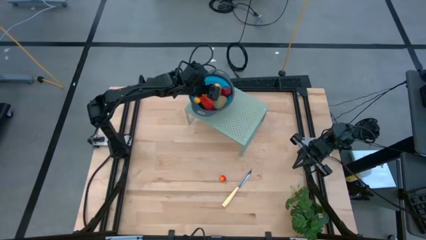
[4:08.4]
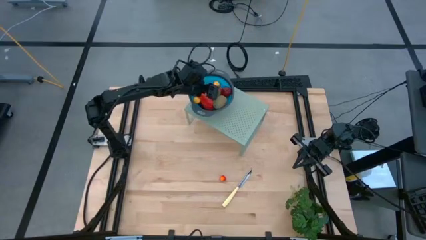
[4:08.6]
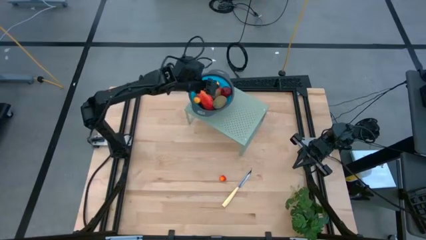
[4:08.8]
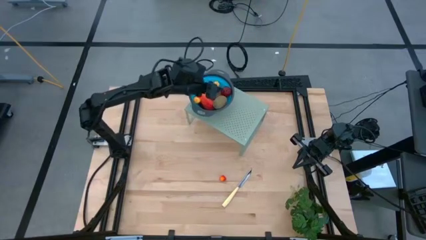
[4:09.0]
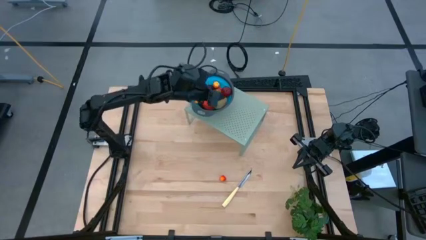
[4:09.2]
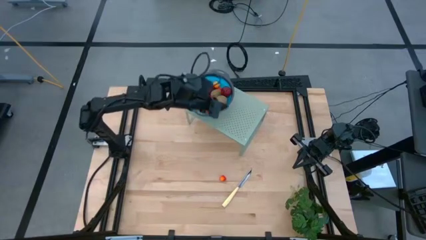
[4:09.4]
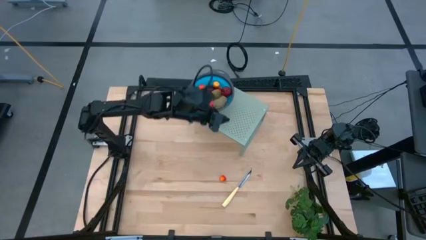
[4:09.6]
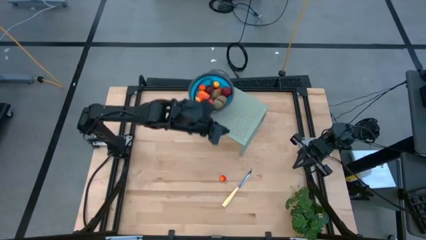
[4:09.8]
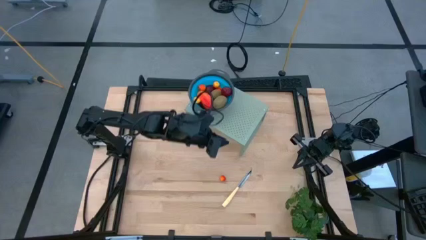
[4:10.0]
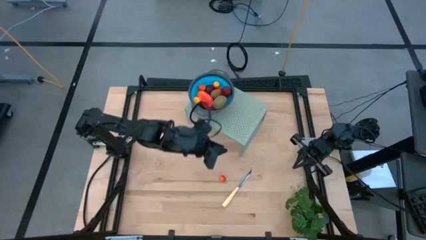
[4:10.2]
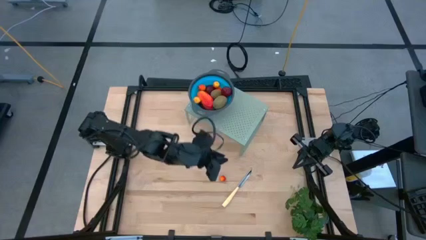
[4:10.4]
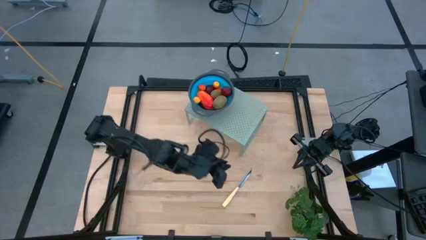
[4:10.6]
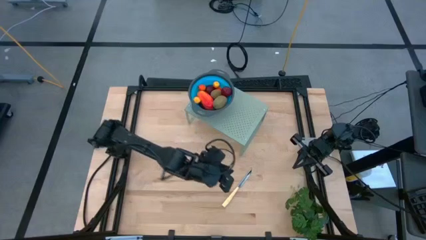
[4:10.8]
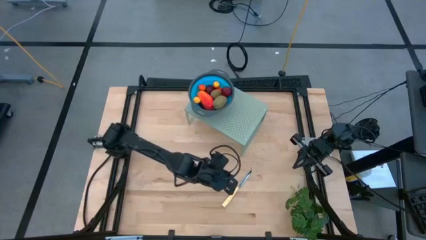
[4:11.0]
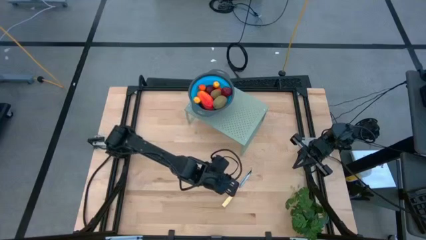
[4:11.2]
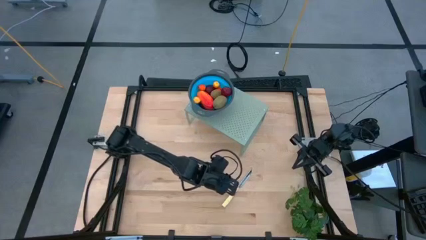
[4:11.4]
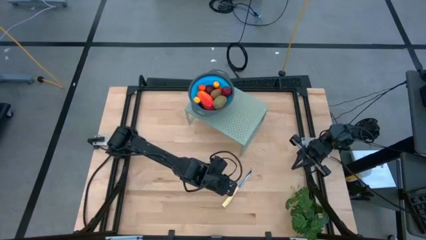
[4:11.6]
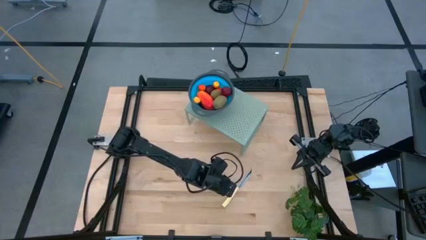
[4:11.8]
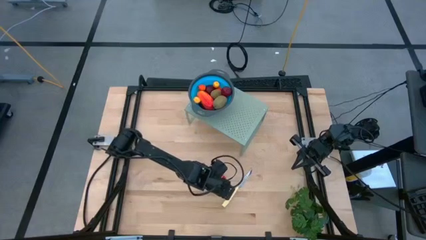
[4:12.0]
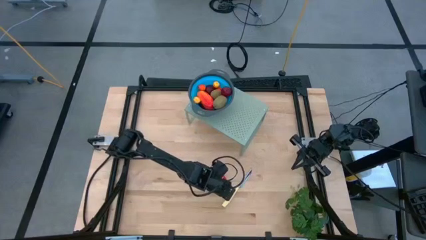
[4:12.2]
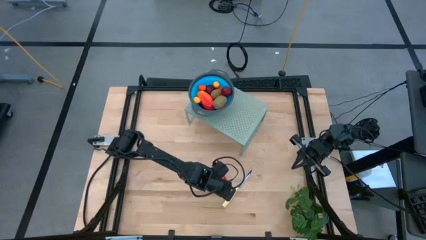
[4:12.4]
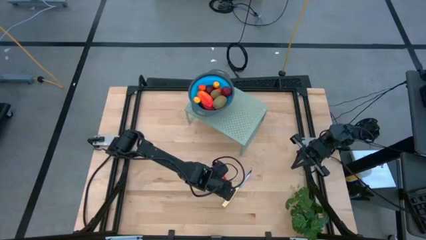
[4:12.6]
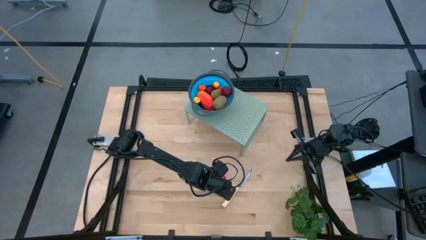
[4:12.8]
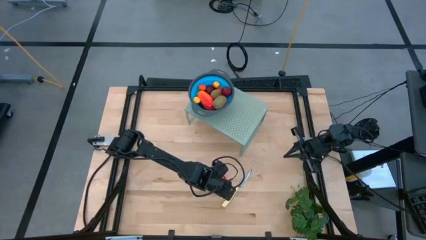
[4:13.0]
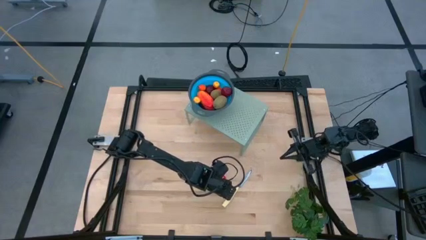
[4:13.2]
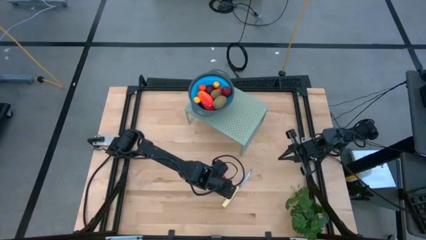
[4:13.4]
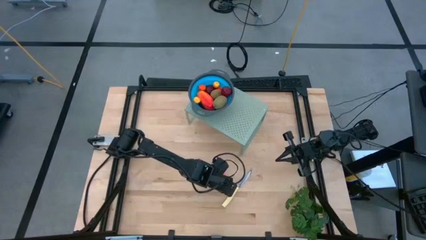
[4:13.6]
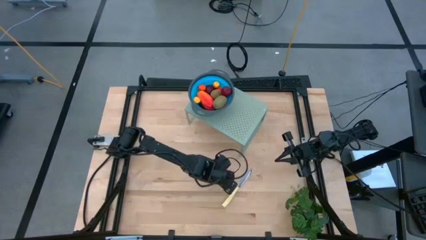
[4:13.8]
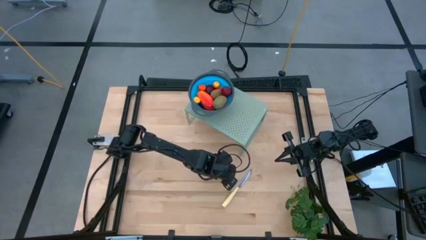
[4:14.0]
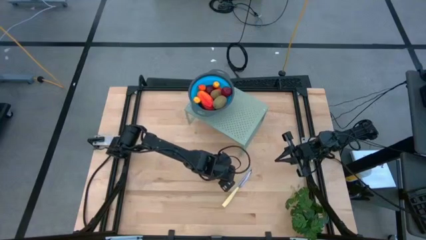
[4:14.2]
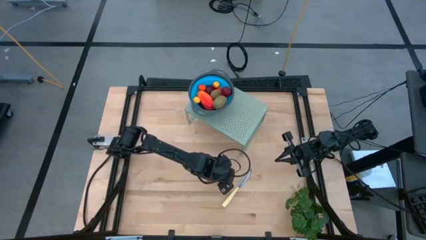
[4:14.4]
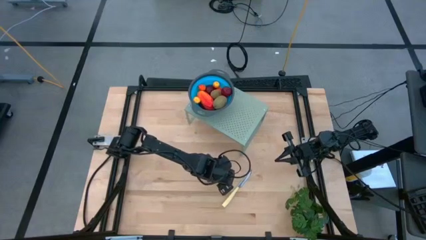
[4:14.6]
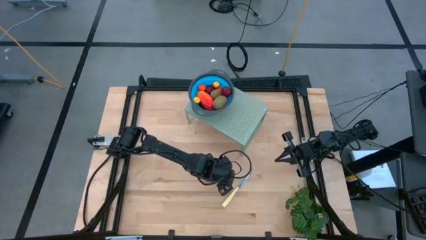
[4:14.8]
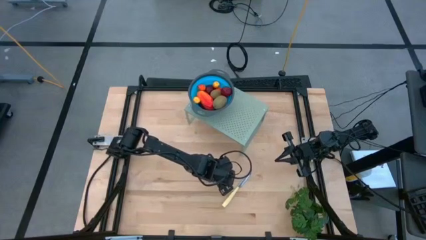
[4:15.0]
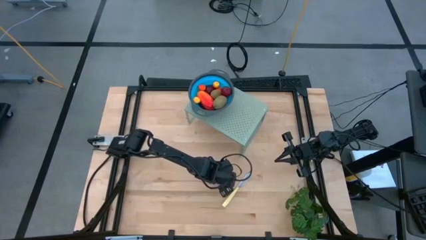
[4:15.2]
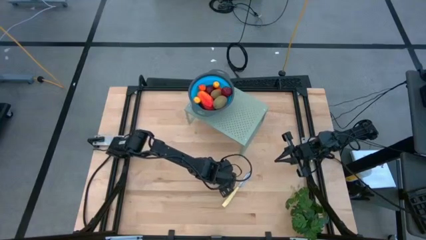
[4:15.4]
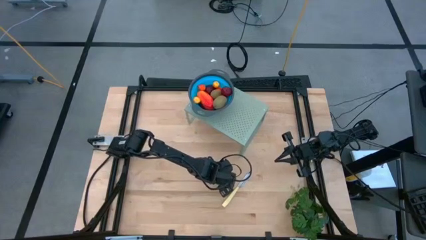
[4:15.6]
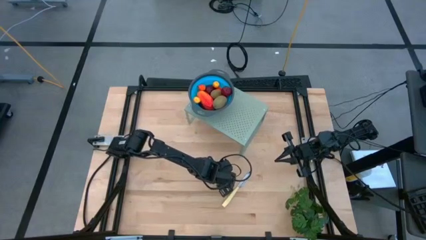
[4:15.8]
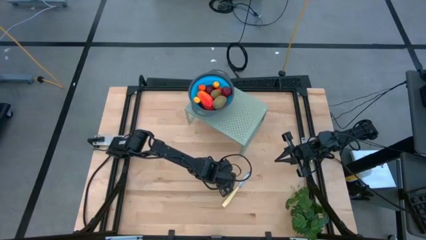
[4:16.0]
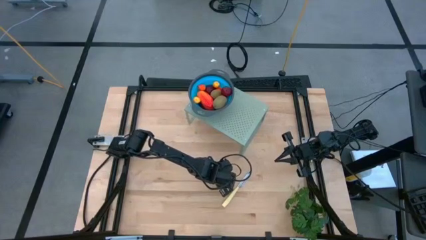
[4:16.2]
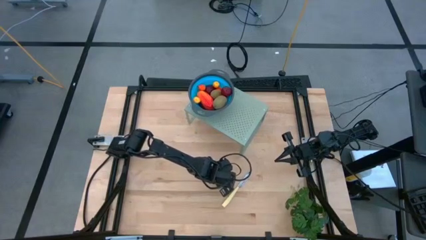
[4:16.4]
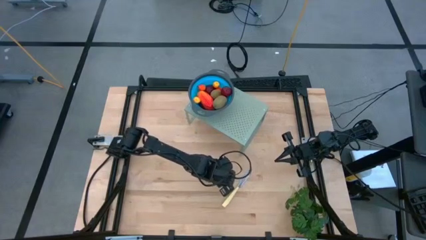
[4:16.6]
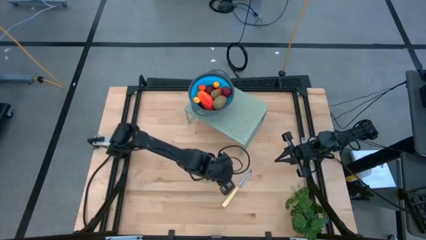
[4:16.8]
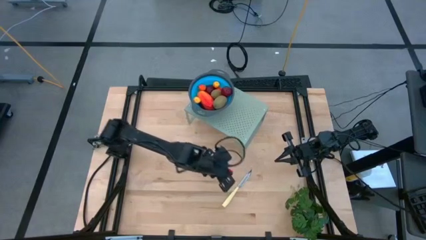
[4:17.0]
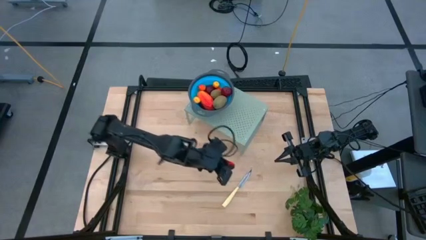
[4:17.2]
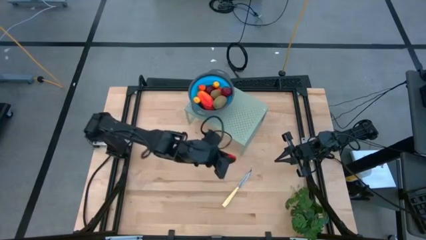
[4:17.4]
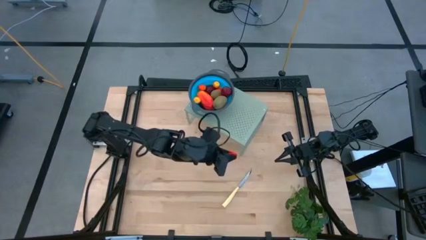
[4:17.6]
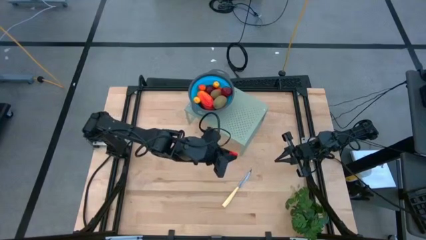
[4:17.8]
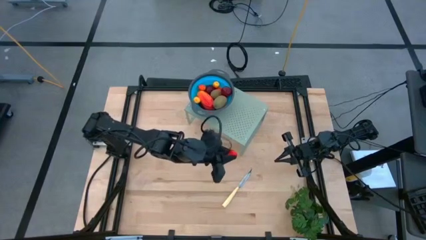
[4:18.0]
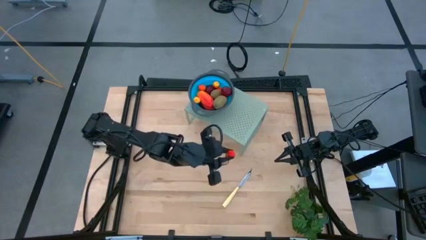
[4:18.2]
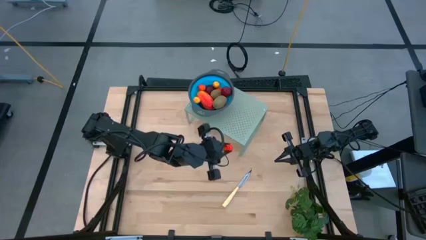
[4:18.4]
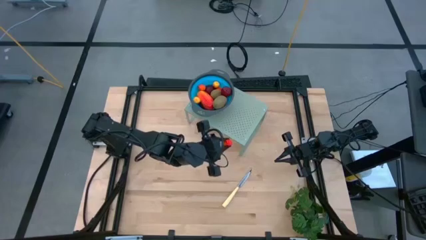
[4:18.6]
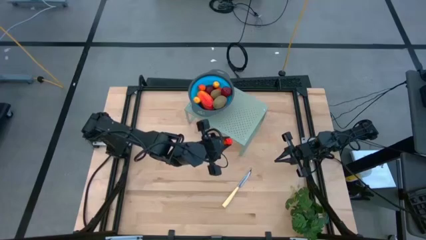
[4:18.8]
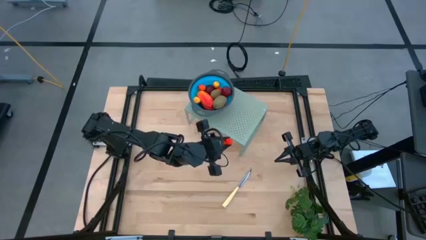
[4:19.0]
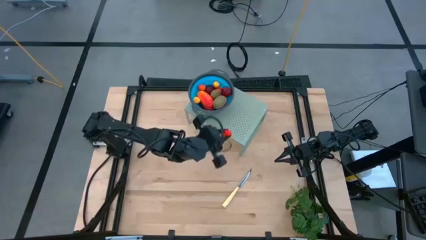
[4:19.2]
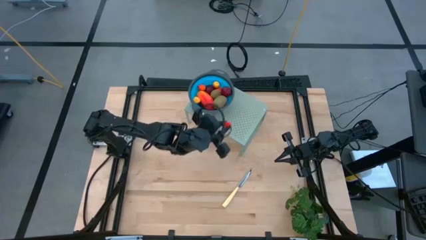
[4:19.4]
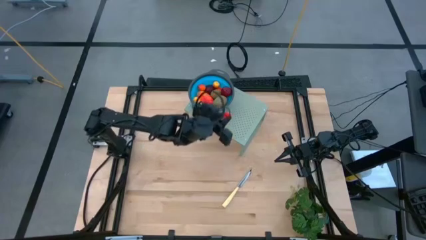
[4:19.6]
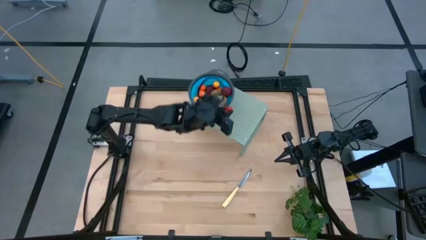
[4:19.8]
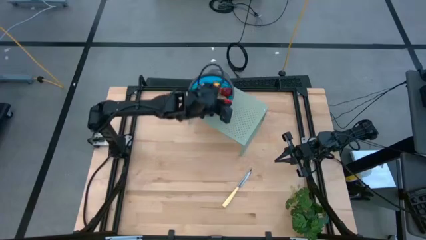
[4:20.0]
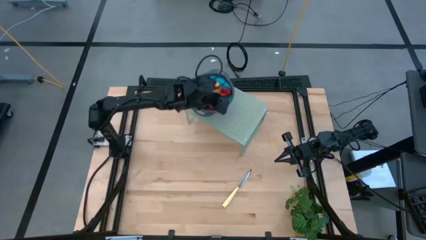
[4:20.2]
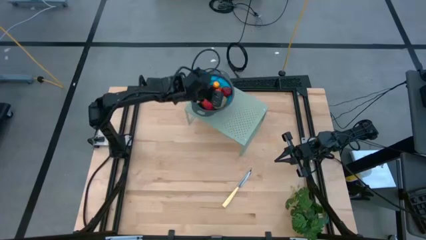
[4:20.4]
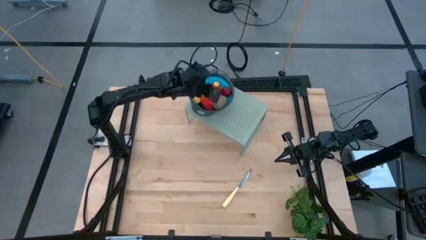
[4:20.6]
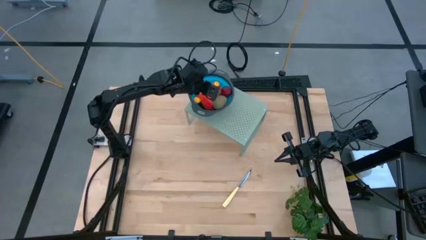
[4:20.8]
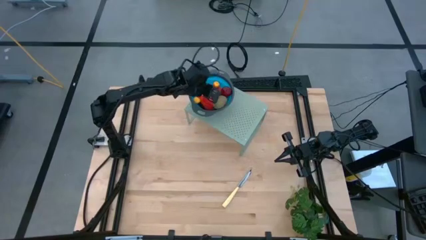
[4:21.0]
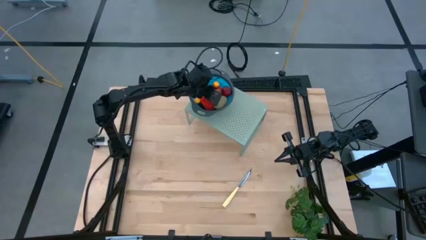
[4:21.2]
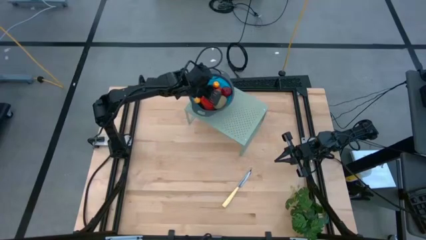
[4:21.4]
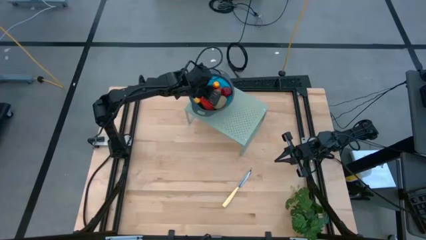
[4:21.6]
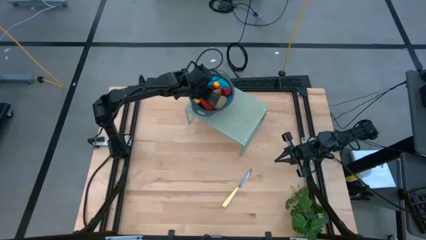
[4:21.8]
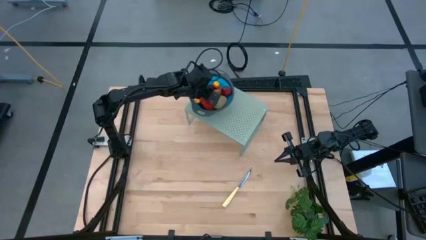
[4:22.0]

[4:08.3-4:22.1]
Task: Pick & Place Fruit
Put the peach into the blue strainer bowl on the shelf
